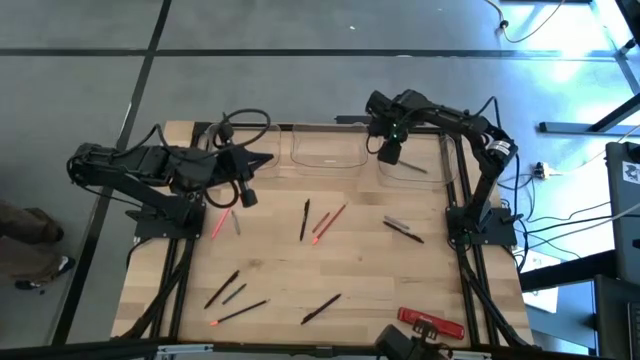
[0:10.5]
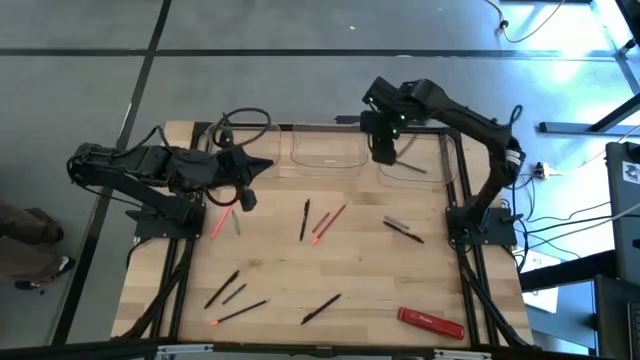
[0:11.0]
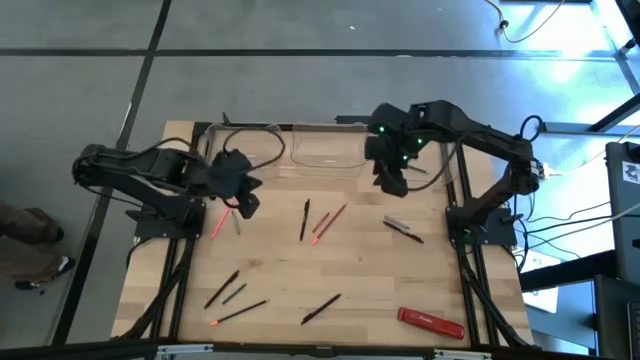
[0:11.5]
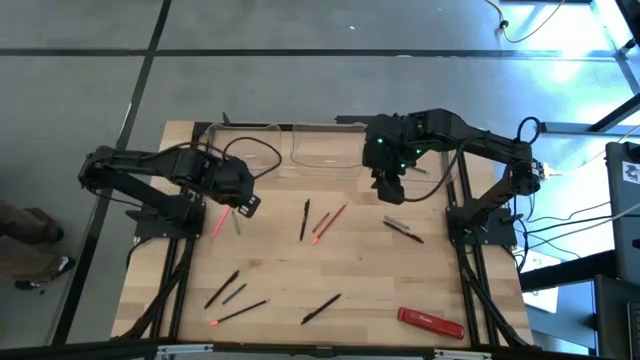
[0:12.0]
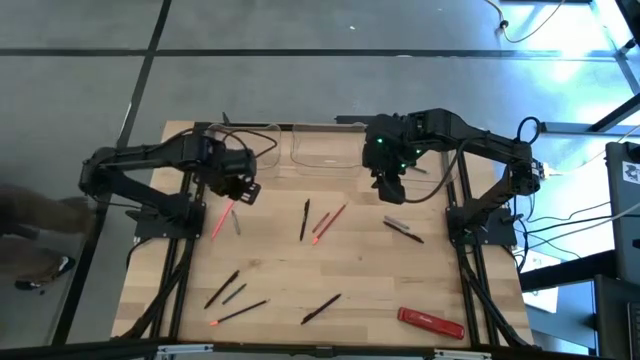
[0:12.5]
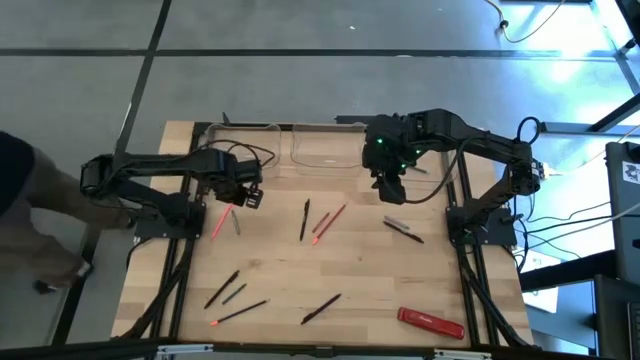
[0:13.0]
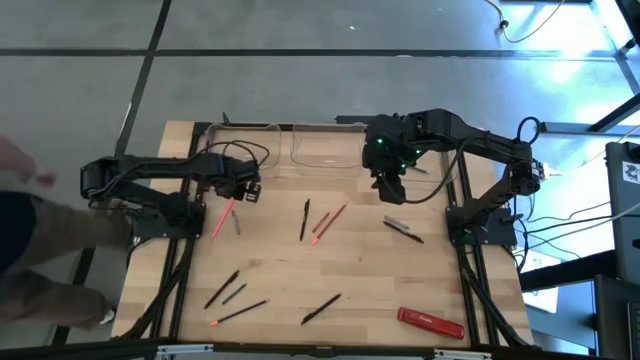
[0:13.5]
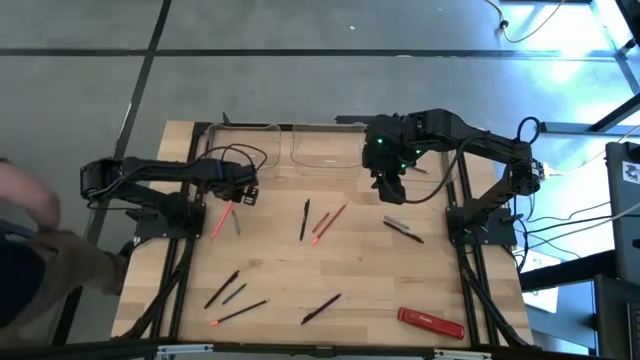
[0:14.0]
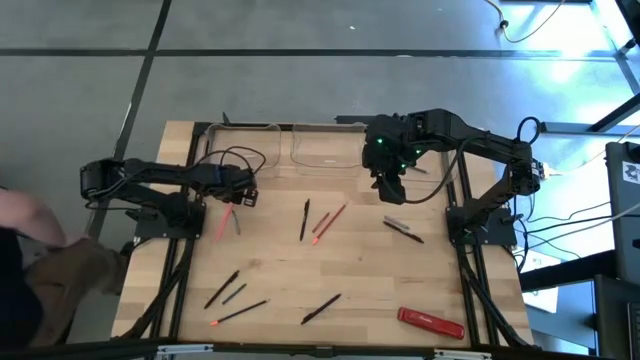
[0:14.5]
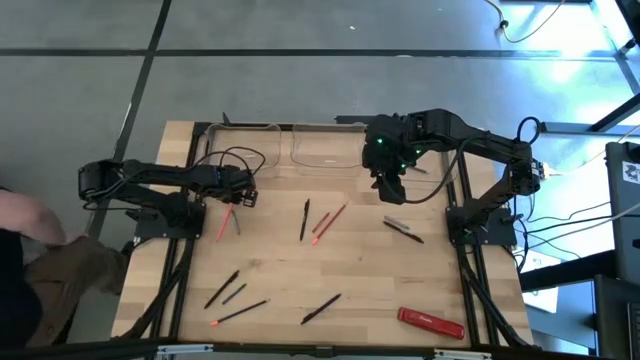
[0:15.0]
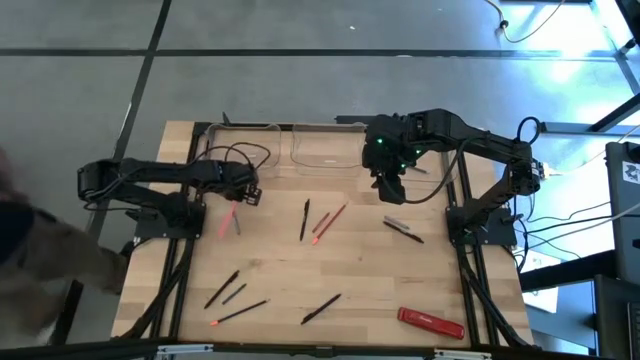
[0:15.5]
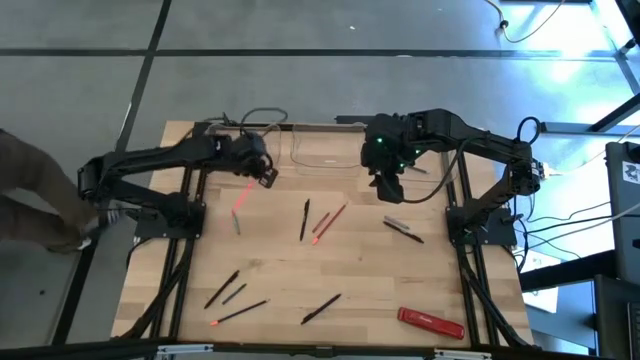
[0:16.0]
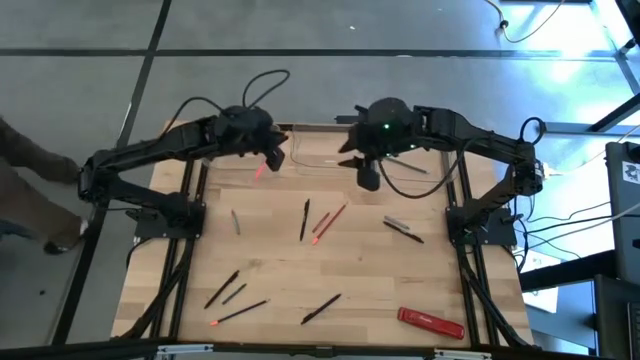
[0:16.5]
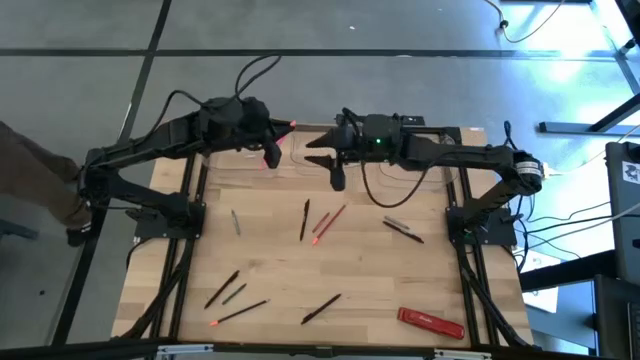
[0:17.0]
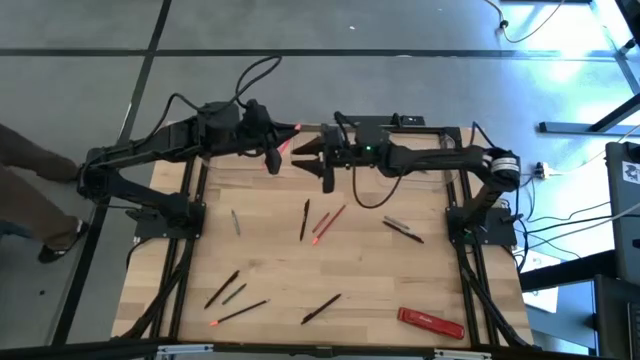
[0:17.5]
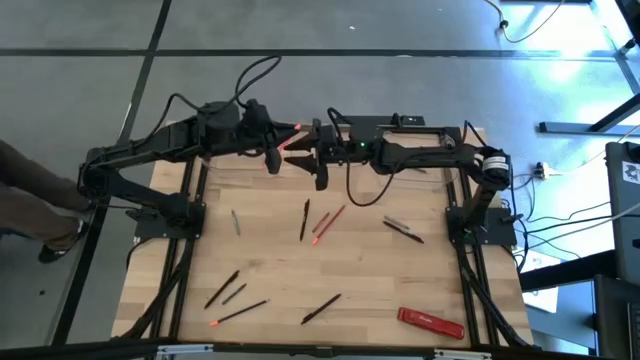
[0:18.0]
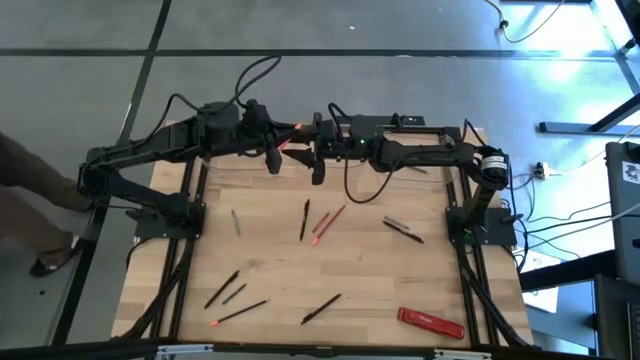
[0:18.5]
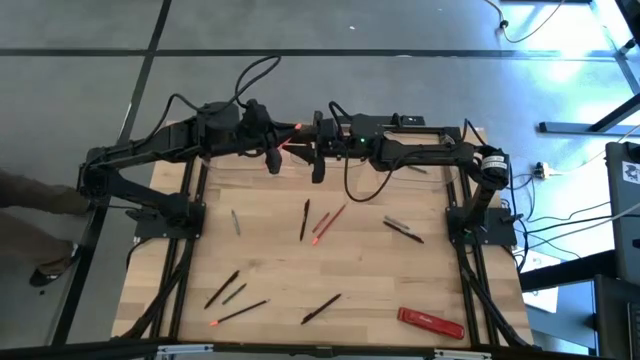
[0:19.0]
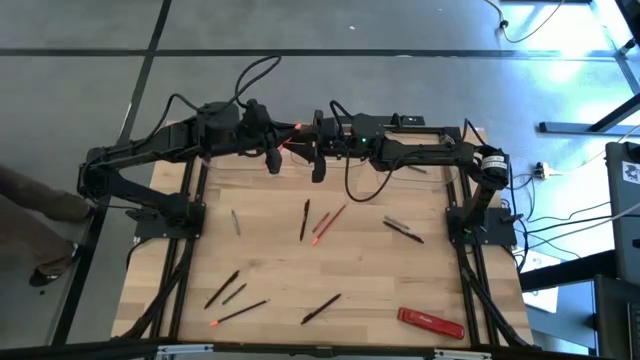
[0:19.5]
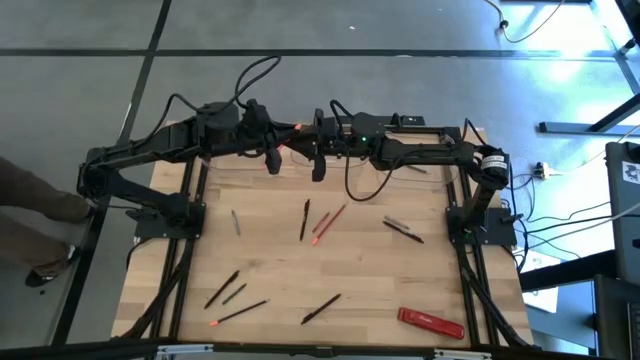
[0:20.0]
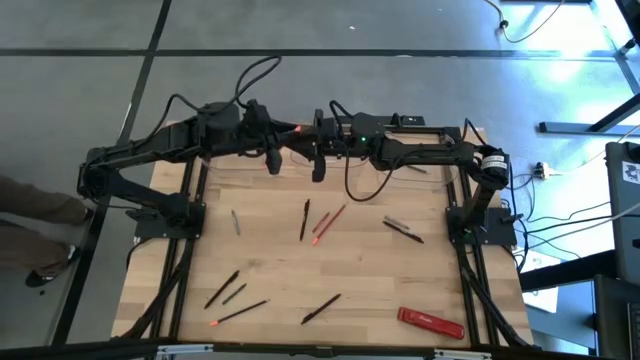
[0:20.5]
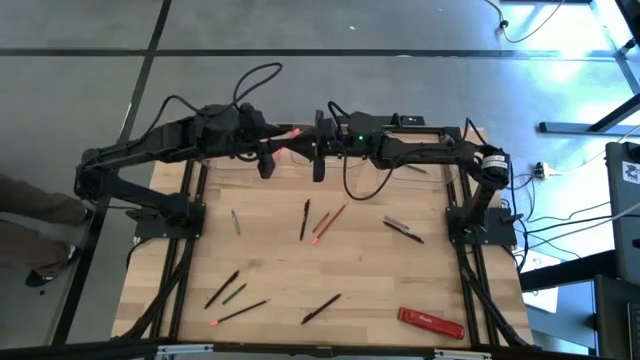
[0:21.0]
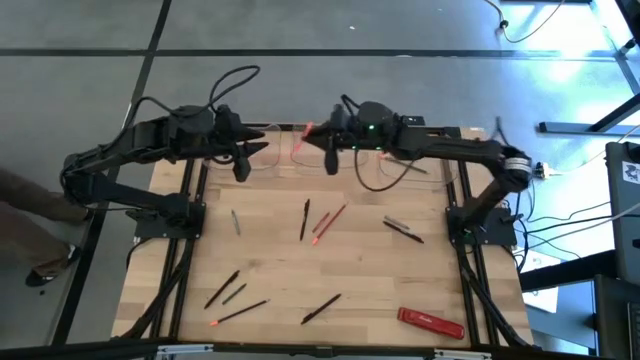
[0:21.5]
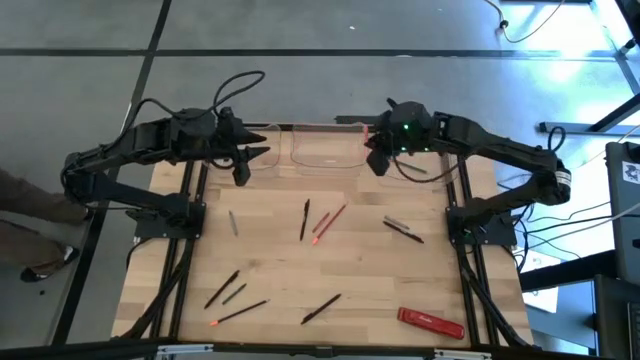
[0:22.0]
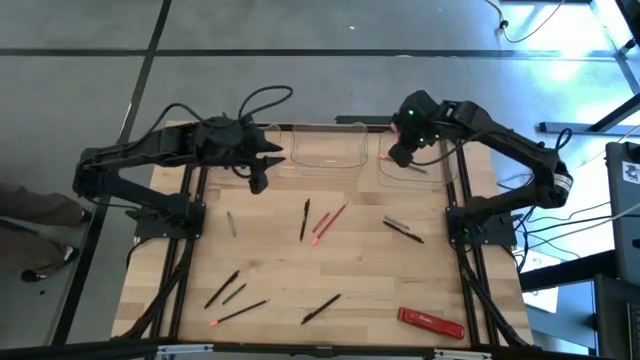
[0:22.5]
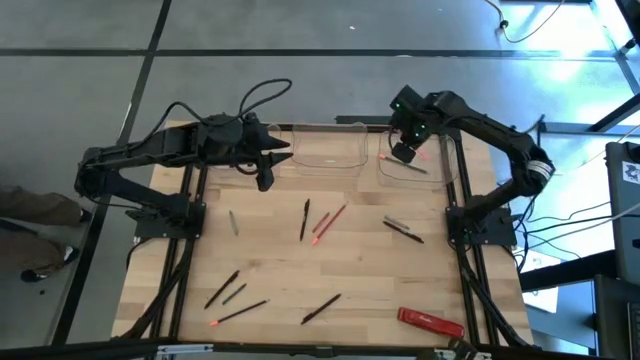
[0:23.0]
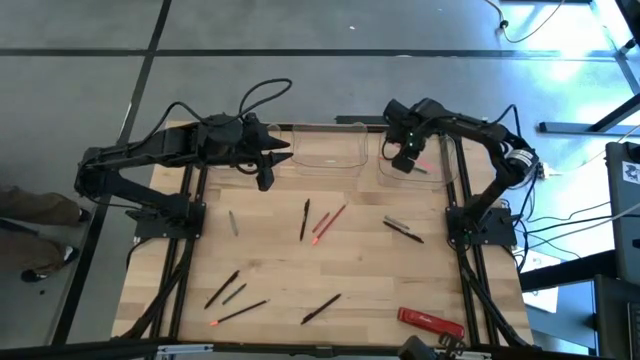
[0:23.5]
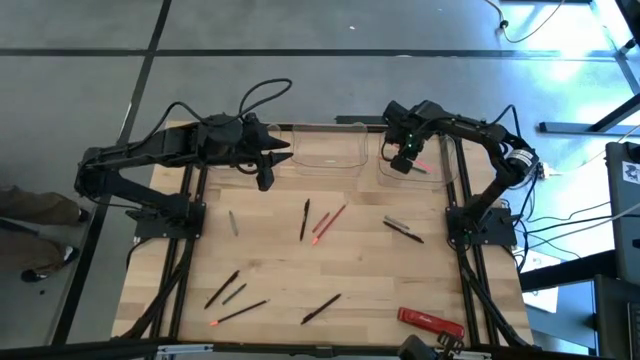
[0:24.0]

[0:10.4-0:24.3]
Task: Sort crayons/erasers/pens/pencils in bins
Put the pink pencil into the right transparent bin

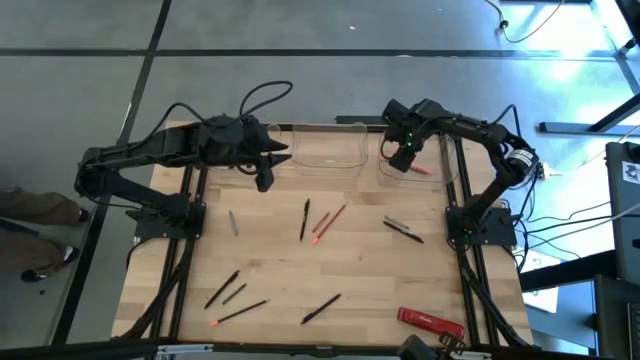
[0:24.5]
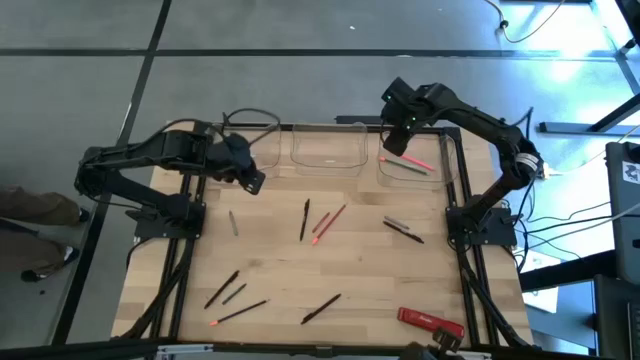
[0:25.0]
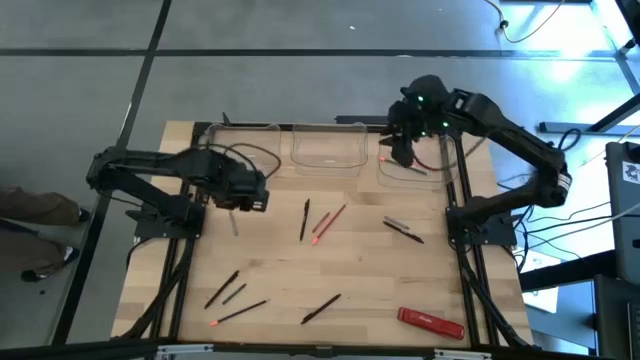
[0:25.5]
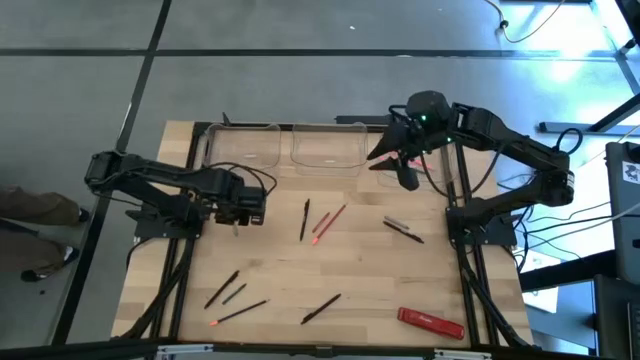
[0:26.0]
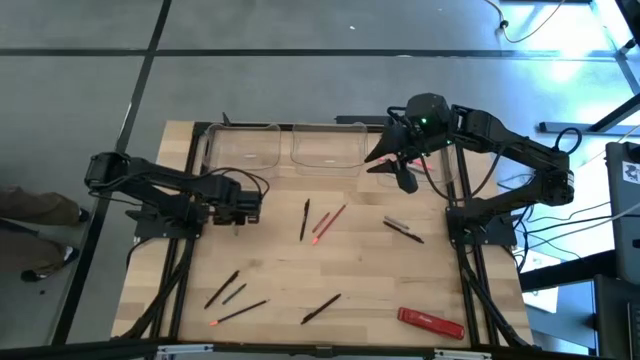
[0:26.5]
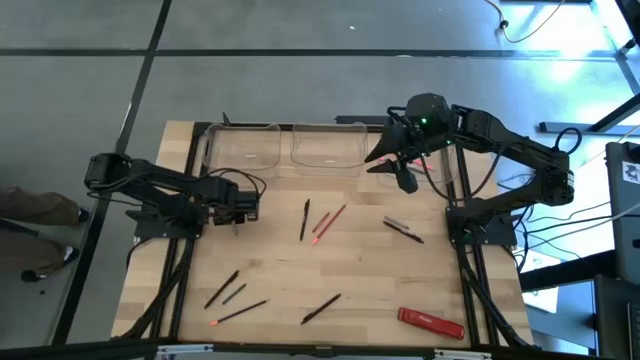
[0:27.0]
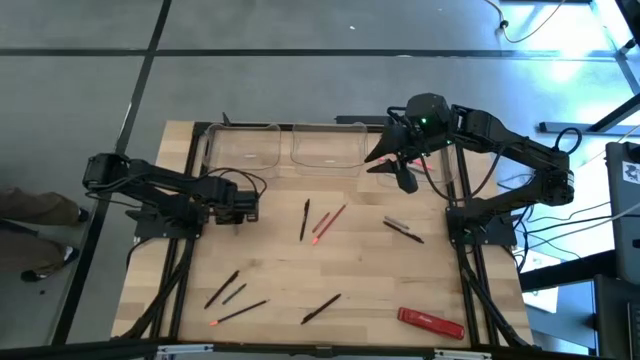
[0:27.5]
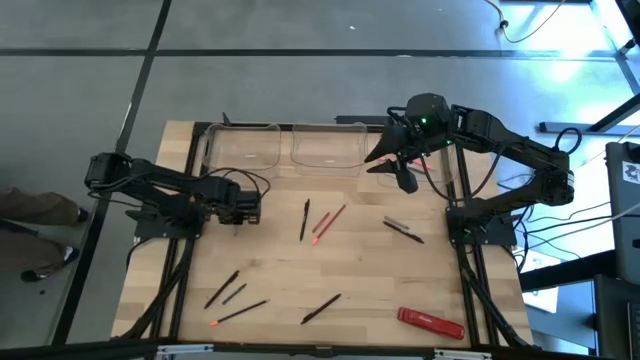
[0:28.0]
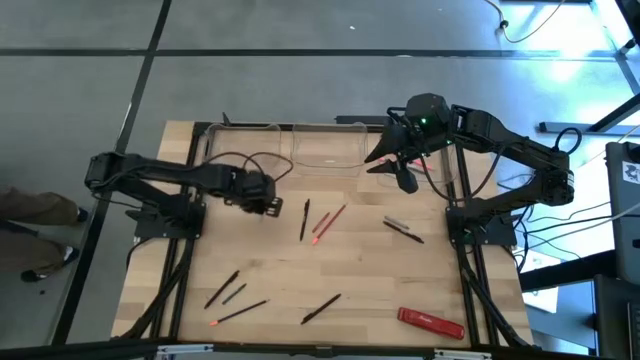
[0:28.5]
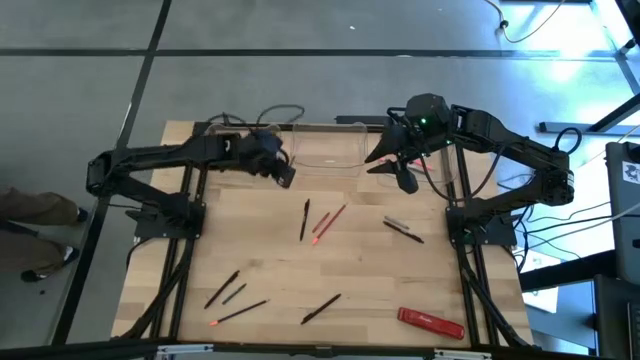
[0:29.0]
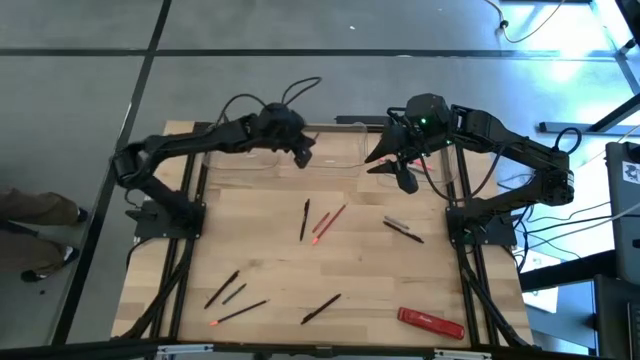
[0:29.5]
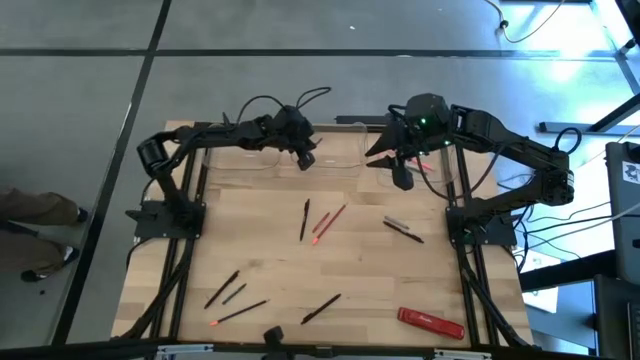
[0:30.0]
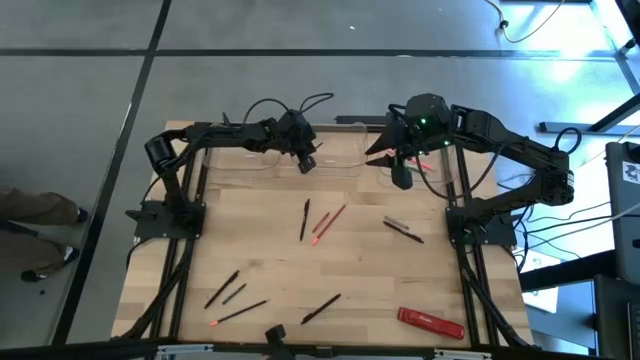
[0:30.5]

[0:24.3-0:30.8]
Put the gray crayon into the center transparent bin

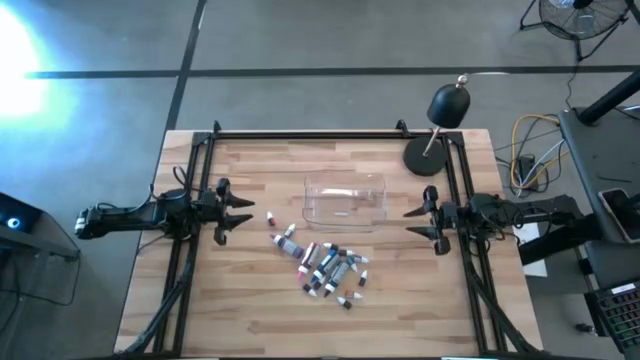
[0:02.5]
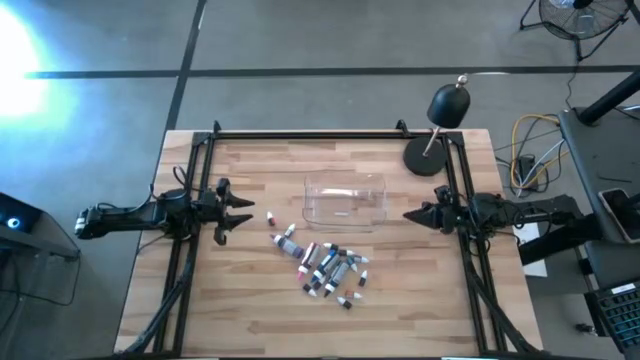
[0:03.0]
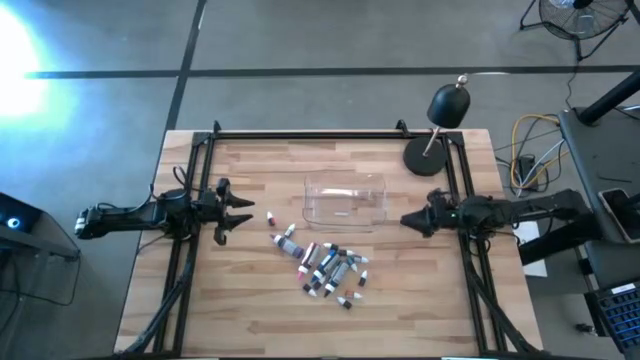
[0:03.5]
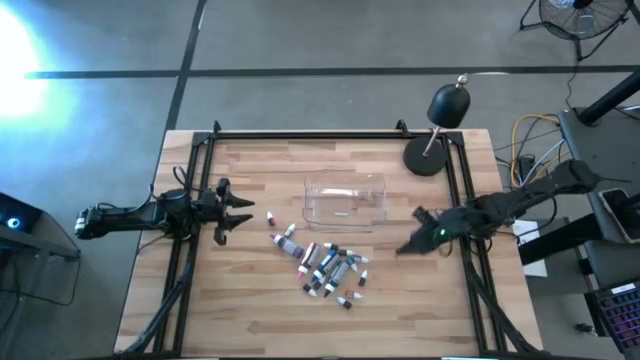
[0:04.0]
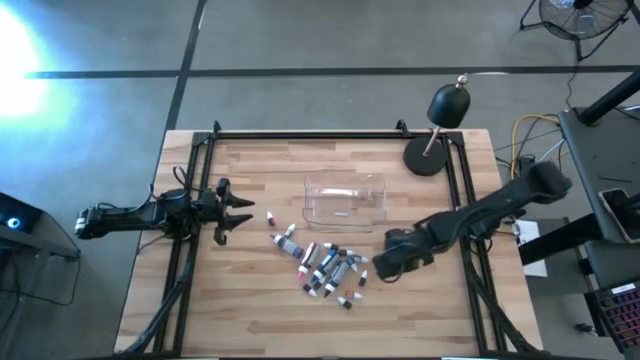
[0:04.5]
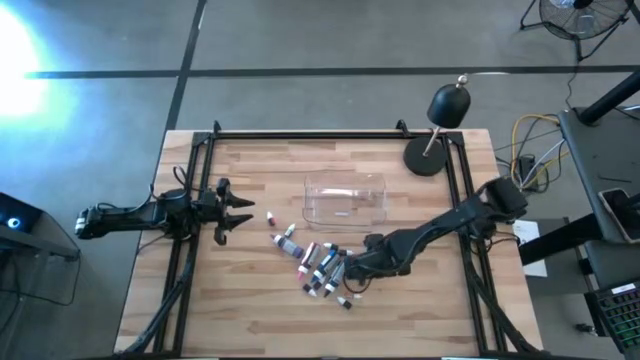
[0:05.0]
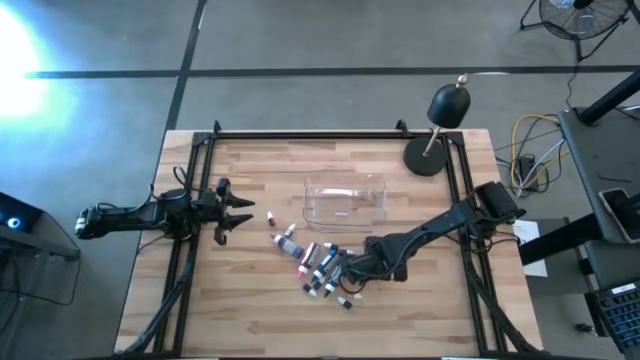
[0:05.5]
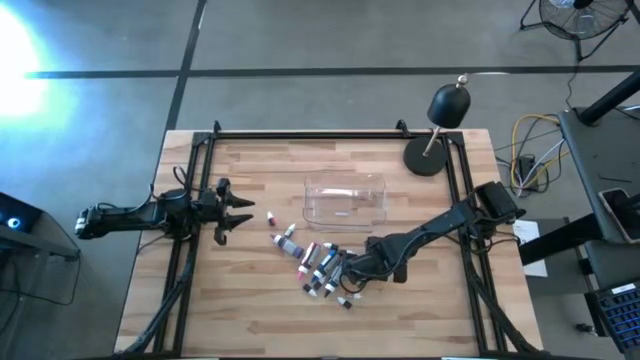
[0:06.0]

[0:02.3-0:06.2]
Task: Pick & Place food coloring
Put the small black food coloring bottle into the transparent bin
